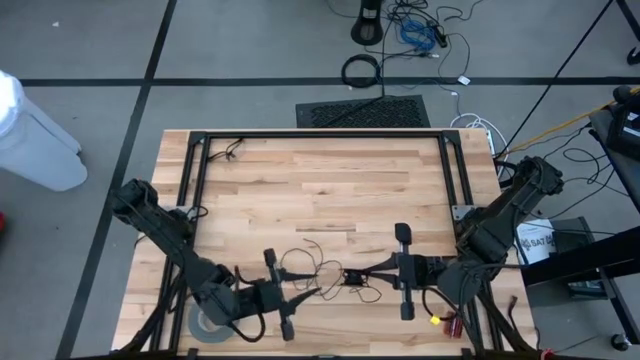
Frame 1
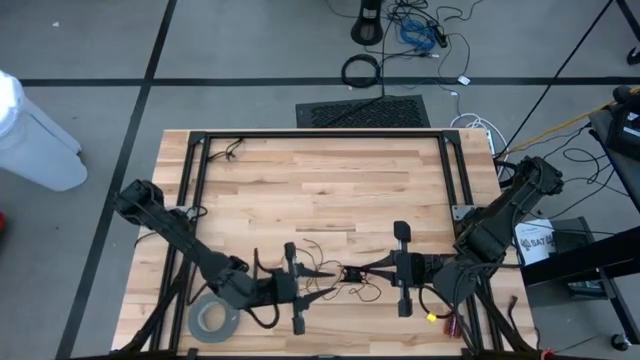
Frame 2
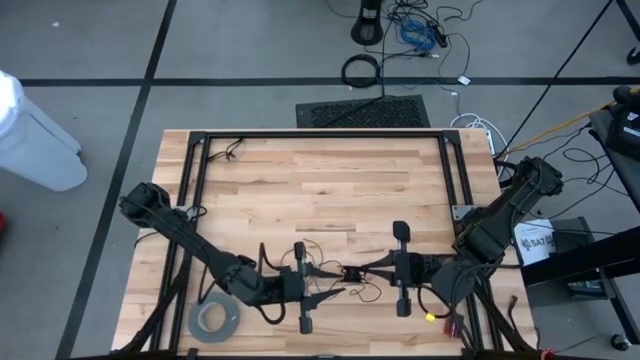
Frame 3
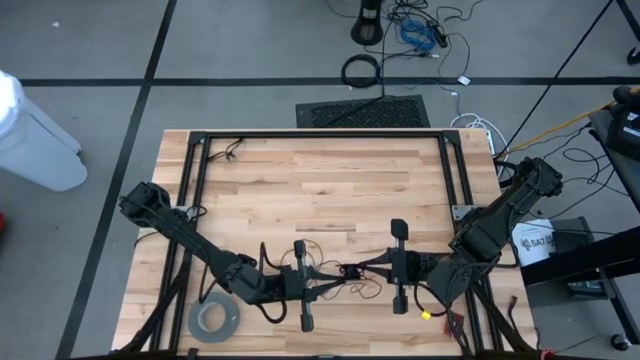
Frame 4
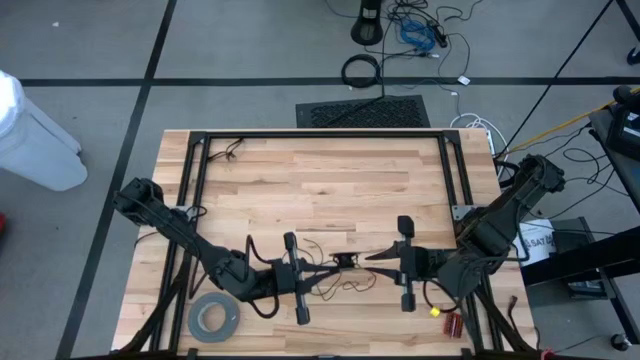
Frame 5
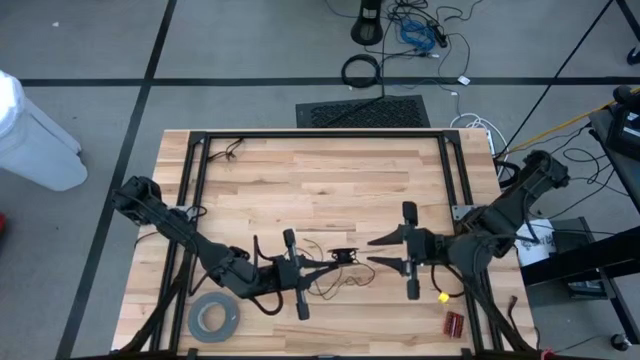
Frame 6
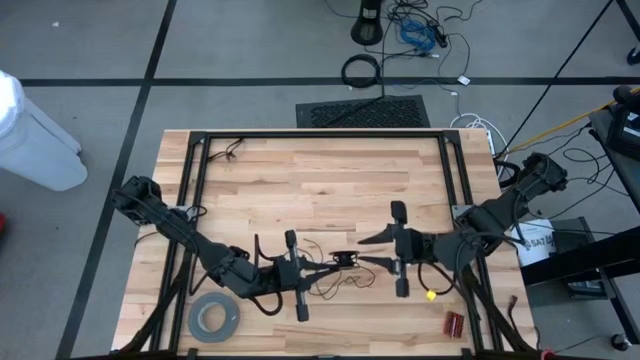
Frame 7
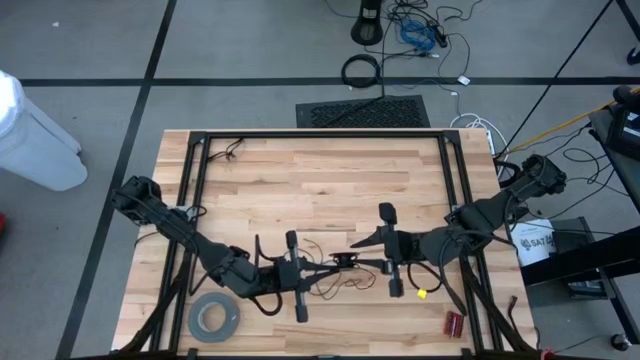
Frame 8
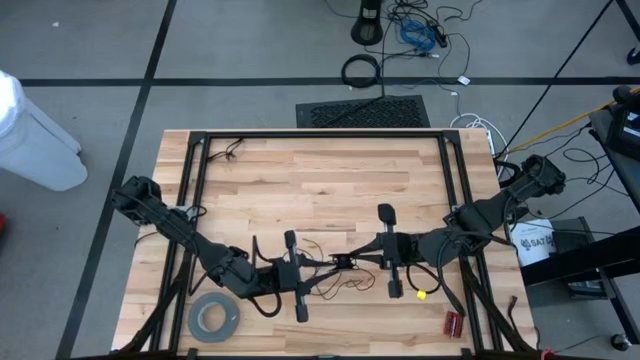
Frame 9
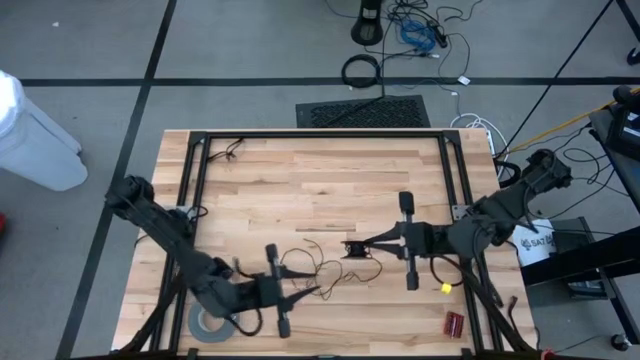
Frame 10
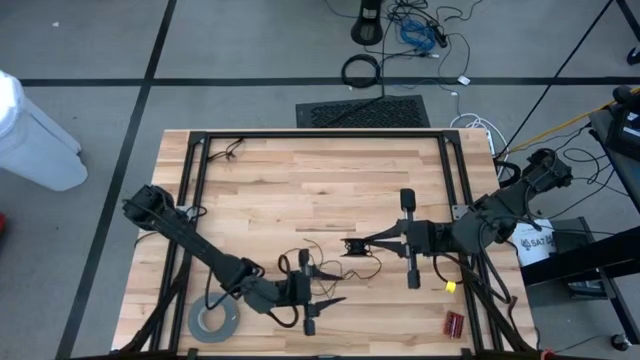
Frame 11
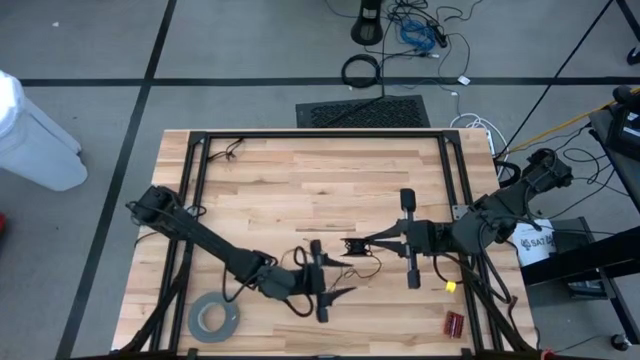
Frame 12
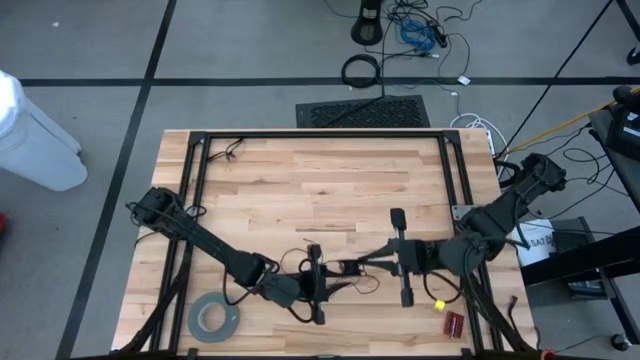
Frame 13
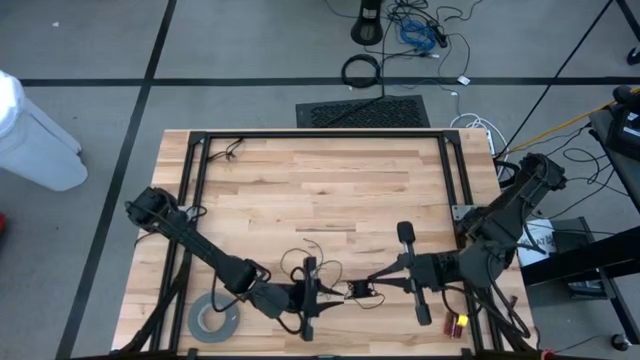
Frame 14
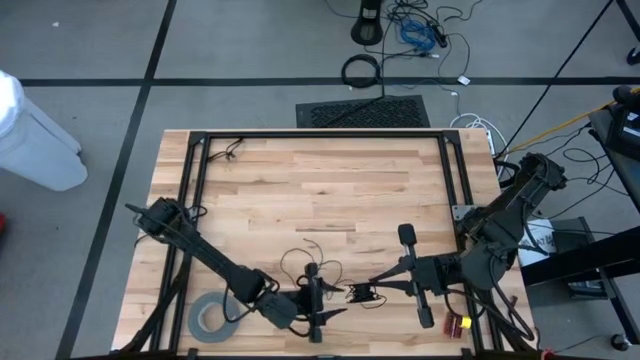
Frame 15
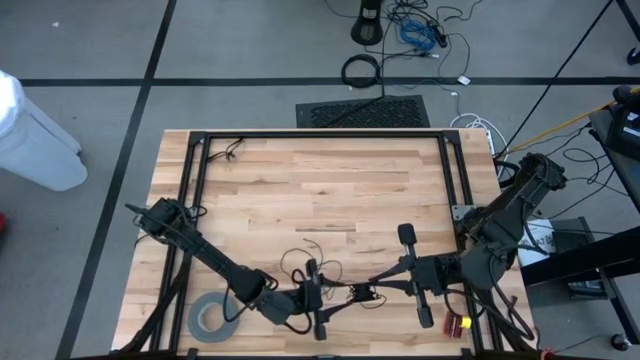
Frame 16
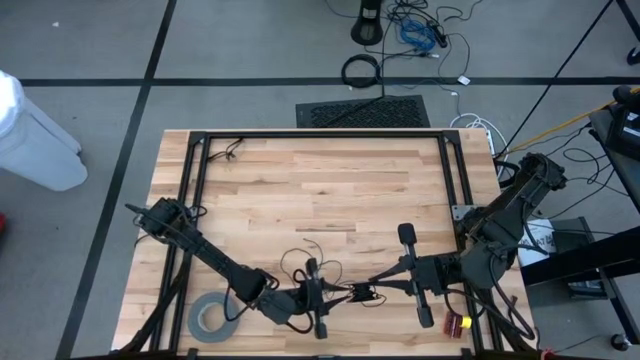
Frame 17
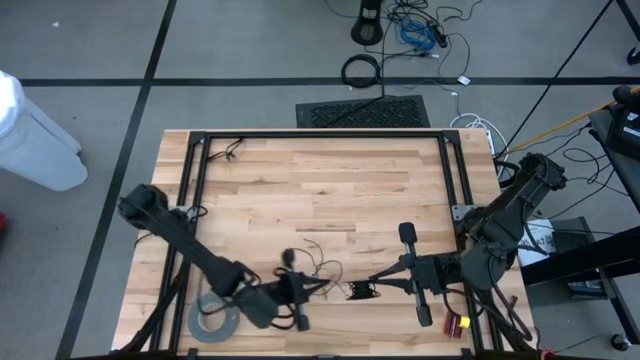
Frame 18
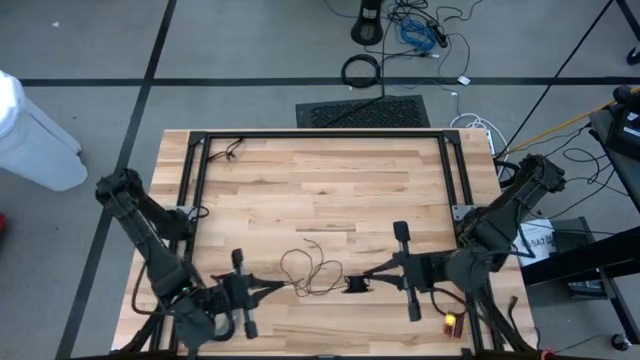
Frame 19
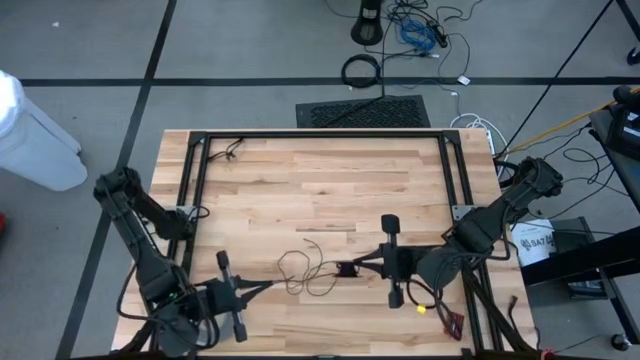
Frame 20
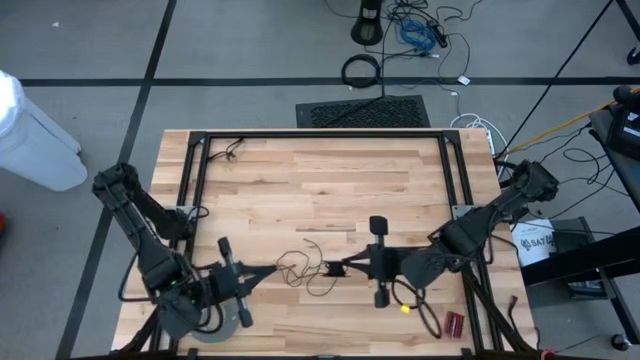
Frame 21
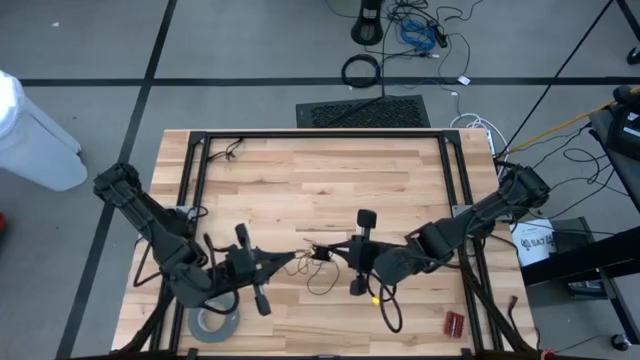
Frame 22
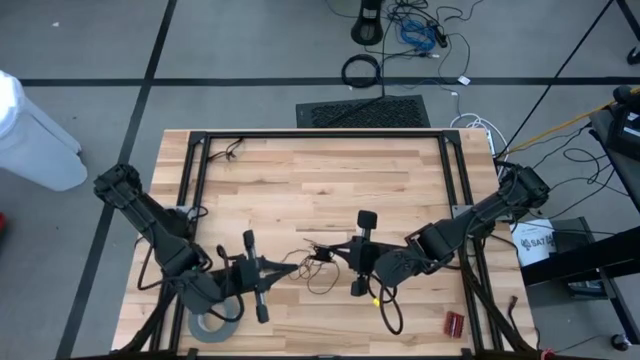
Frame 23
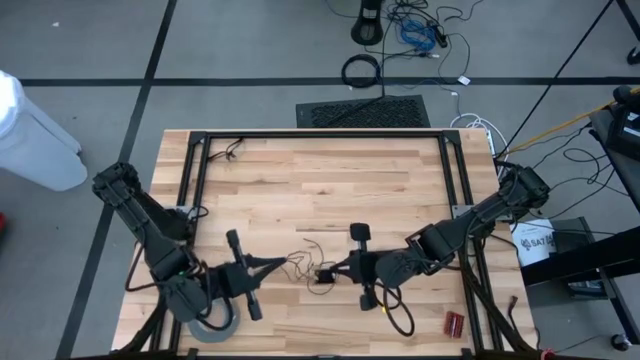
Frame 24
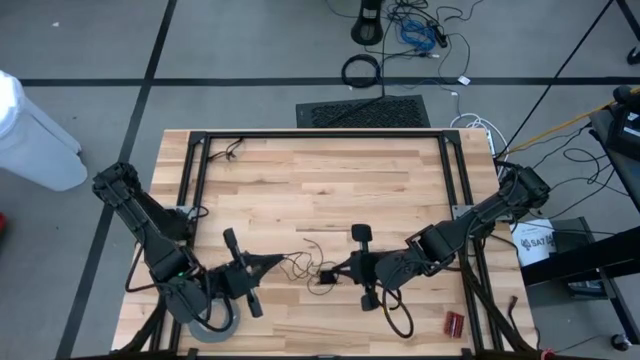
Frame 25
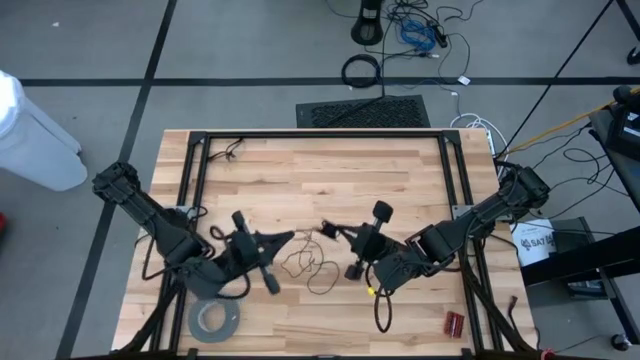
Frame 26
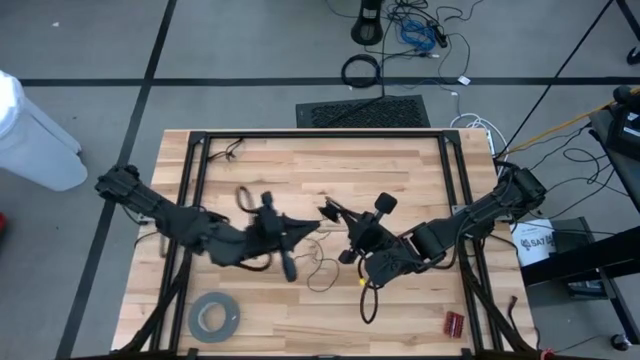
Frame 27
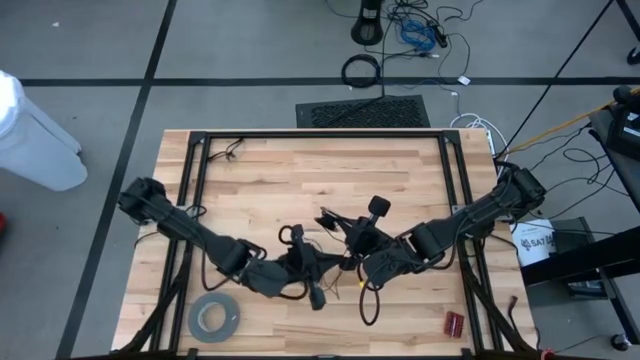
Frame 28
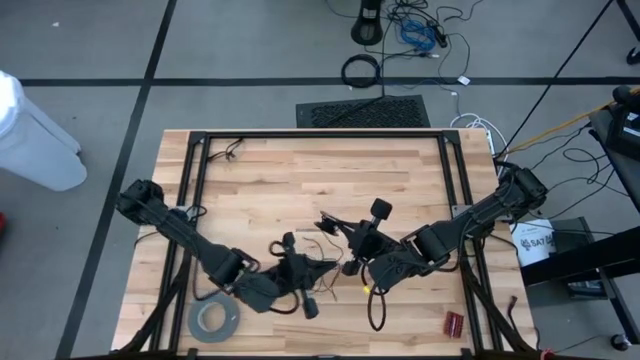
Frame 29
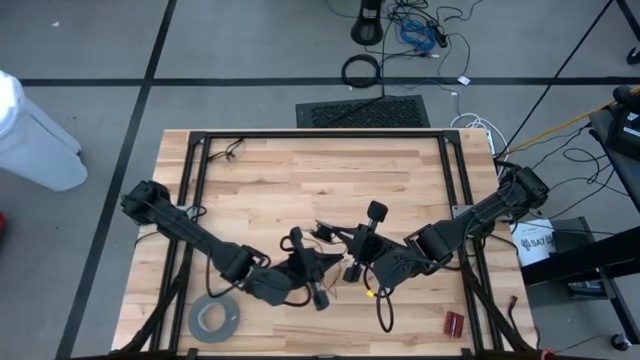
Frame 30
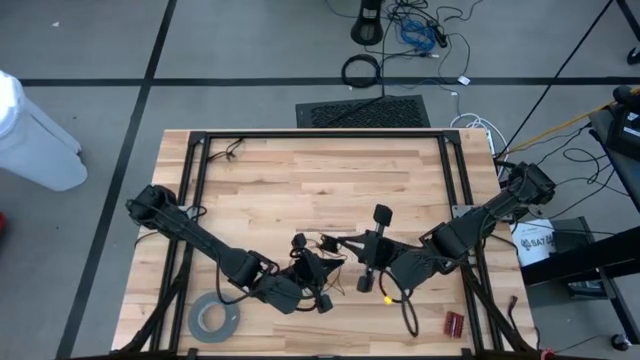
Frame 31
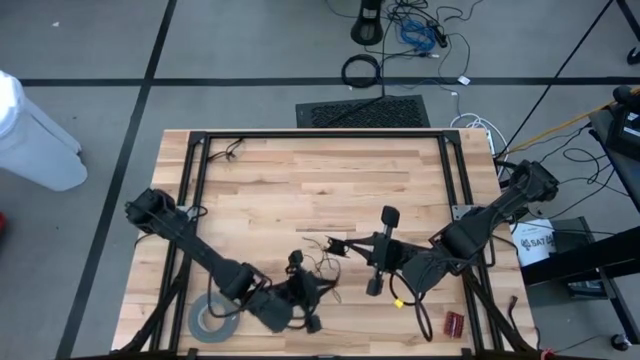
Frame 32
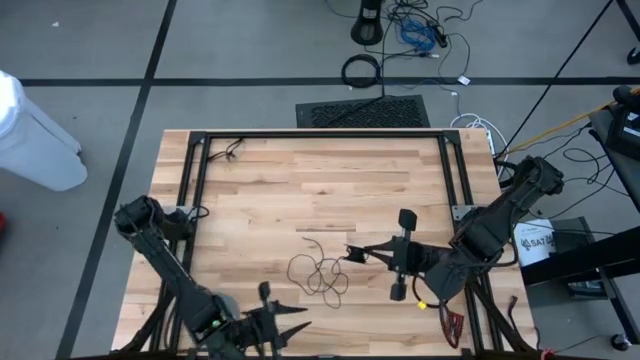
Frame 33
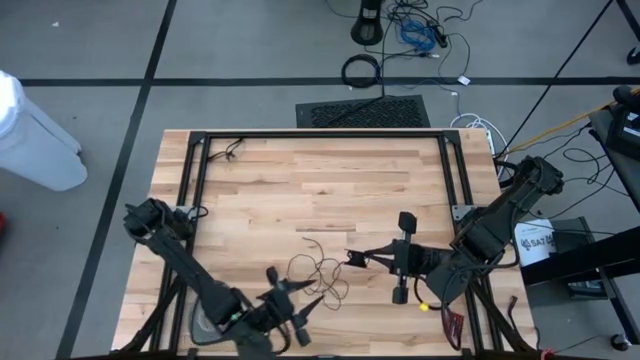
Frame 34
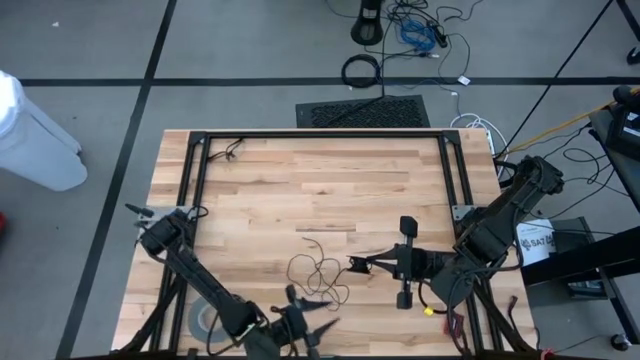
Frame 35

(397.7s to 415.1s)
Task: Coil cords
Coil the black wire onto the spool
